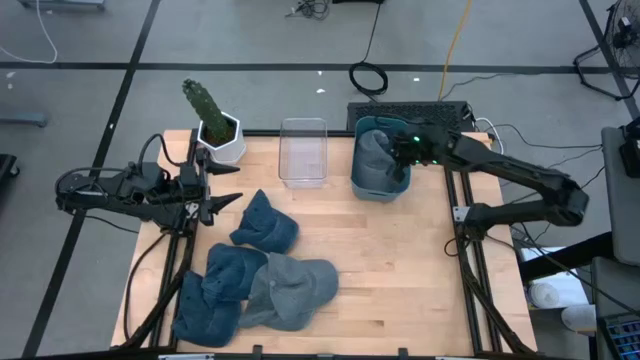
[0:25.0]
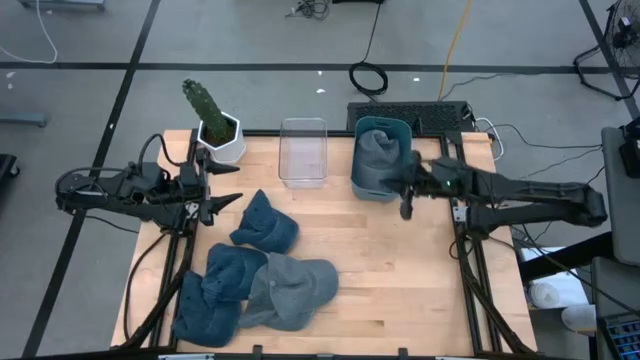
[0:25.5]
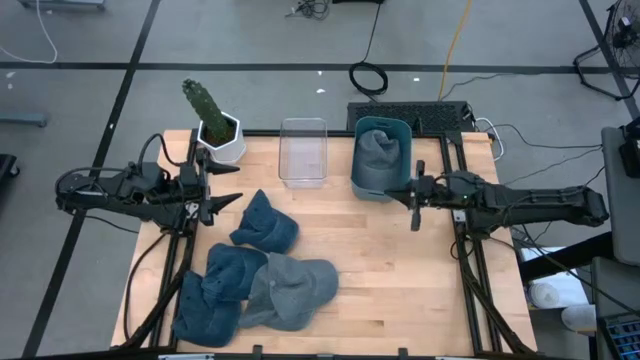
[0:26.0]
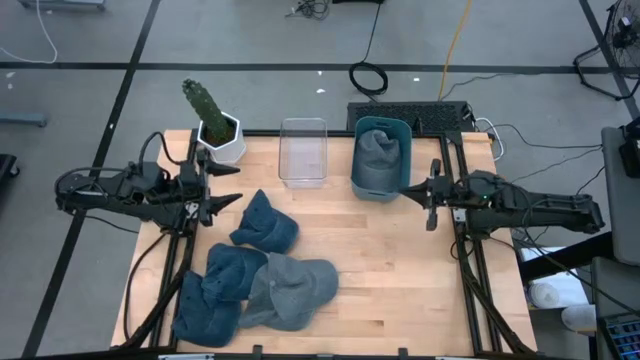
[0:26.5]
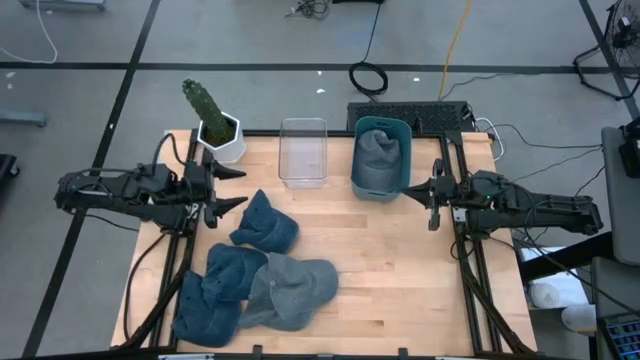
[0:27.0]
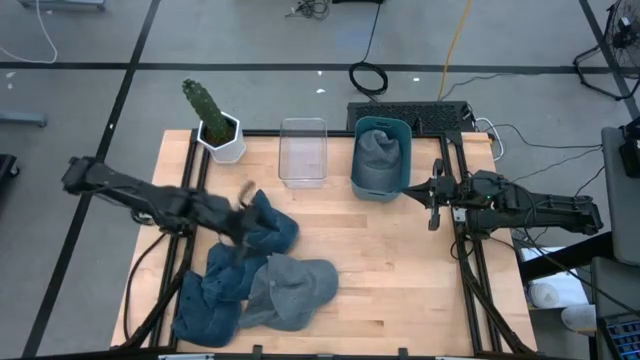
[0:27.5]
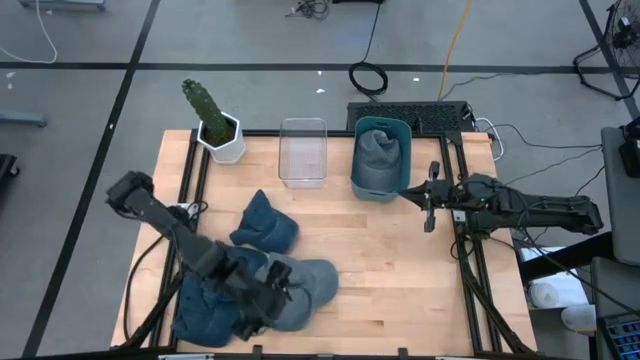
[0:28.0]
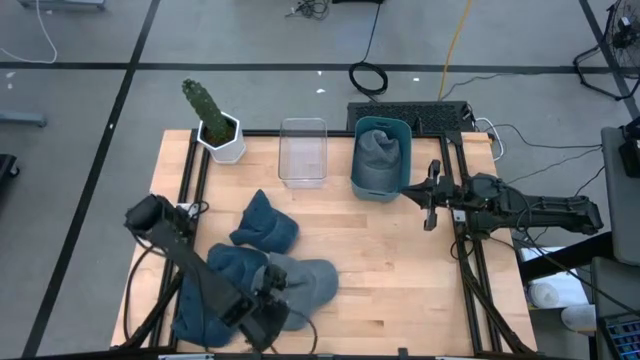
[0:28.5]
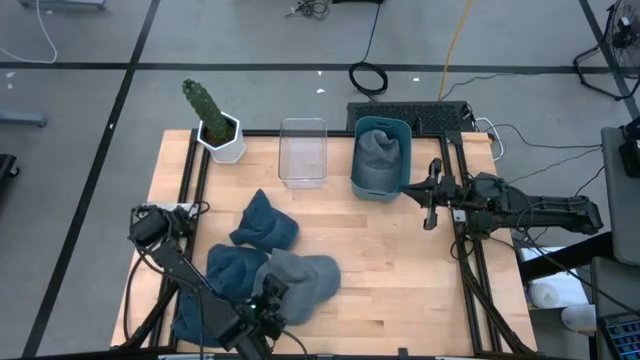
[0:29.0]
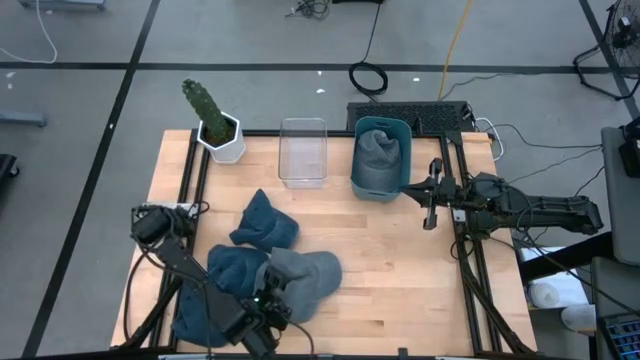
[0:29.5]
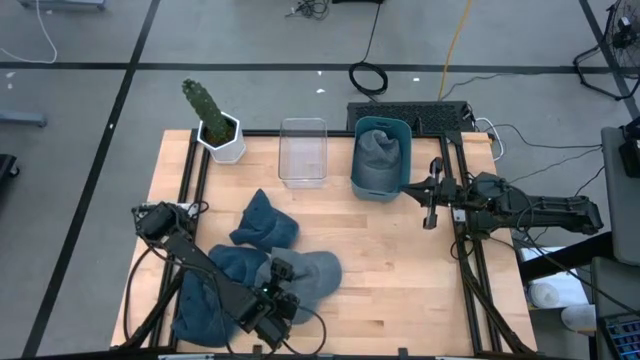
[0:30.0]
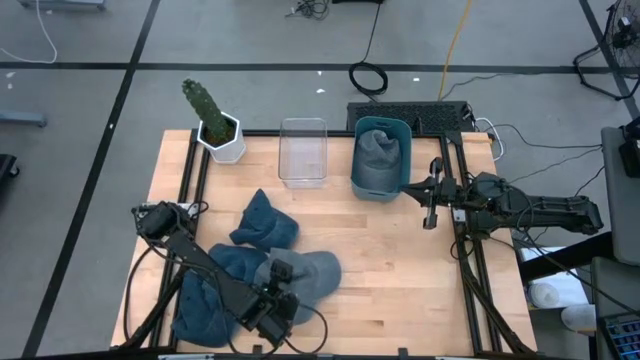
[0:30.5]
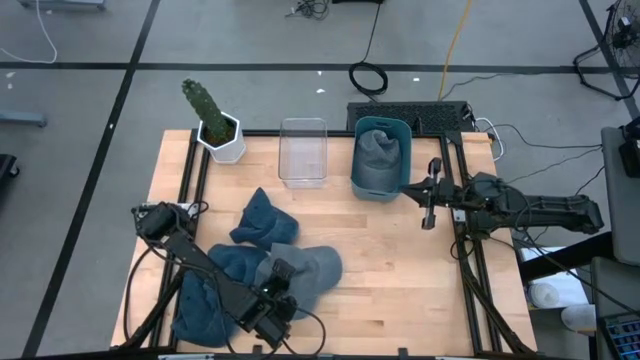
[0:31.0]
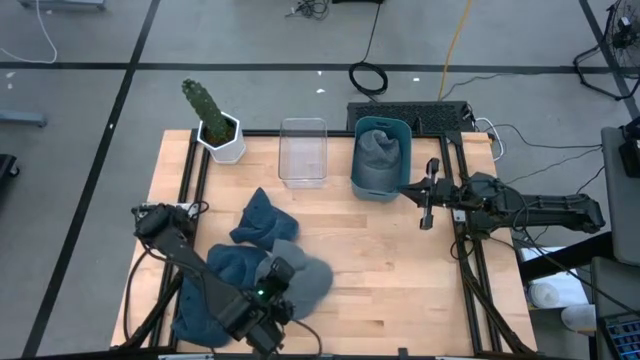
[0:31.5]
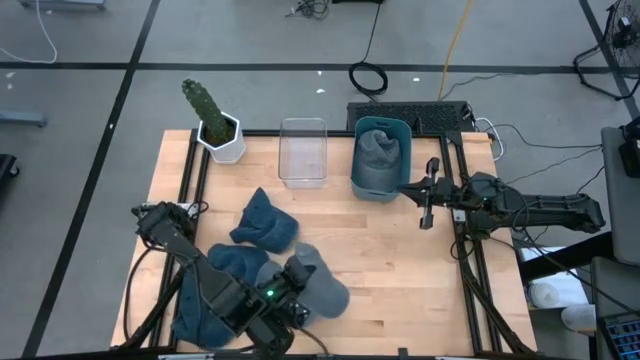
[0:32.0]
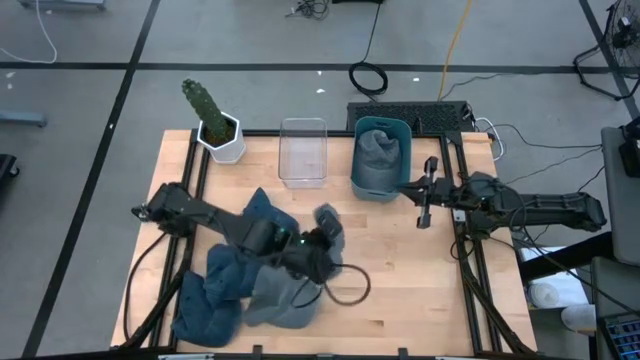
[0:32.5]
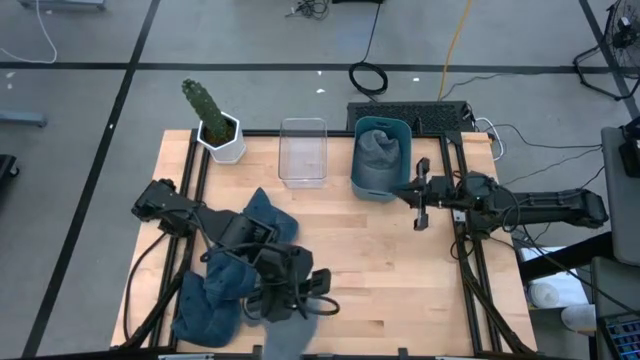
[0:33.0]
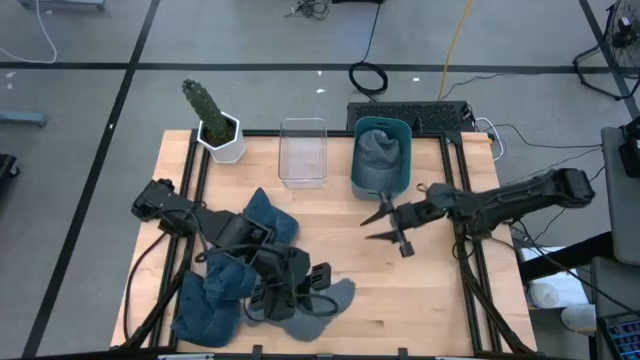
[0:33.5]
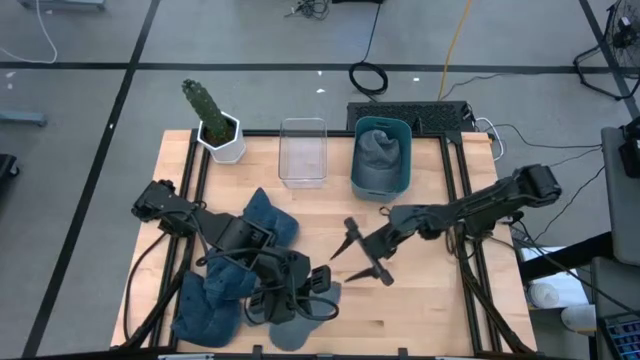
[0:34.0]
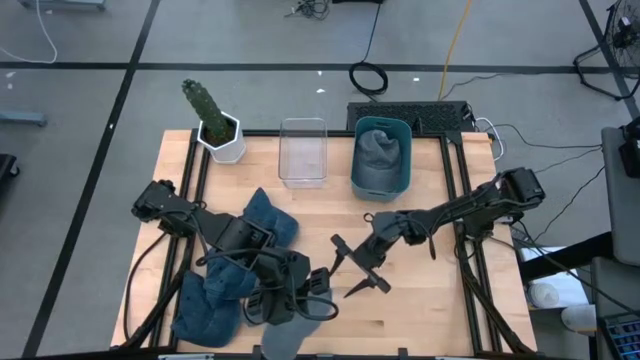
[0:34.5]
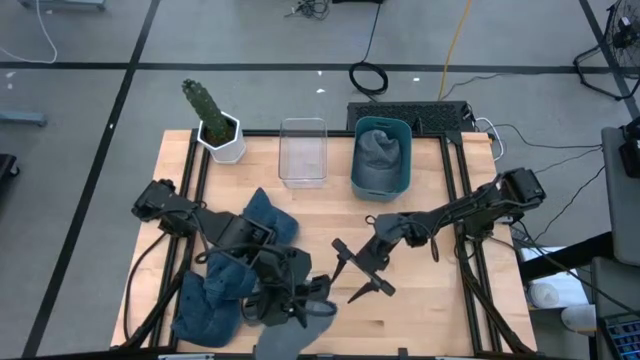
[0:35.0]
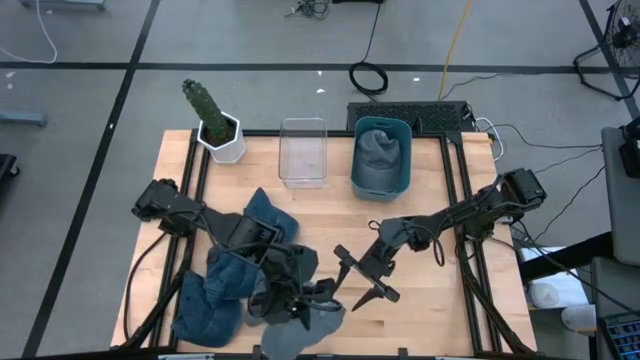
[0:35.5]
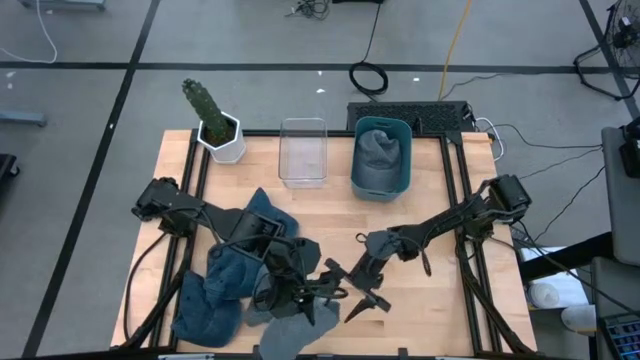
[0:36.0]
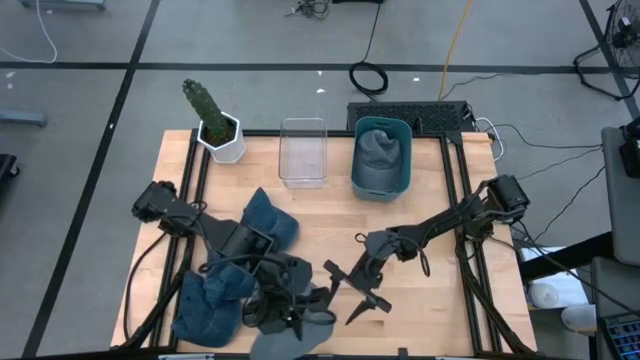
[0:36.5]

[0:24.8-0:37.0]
Task: Pick & Place hat
Put the top gray cap into the blue bin

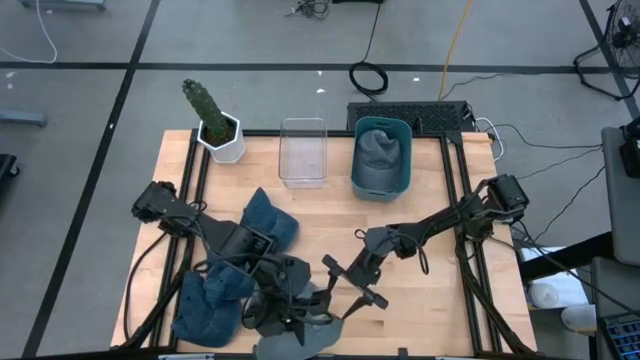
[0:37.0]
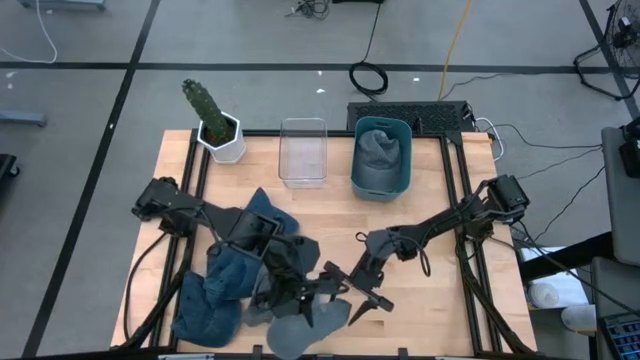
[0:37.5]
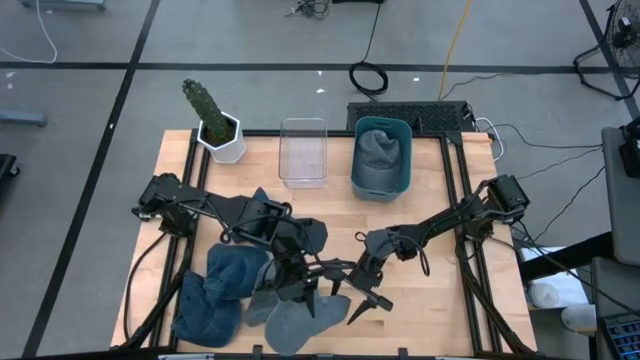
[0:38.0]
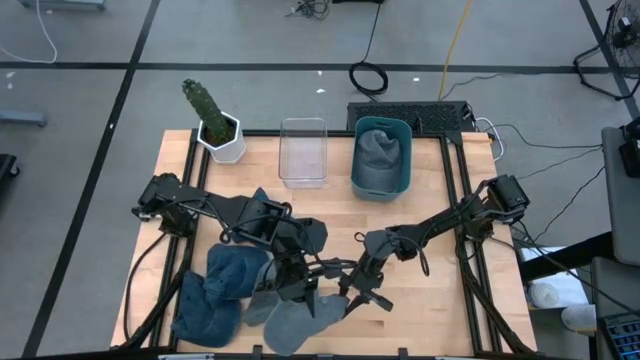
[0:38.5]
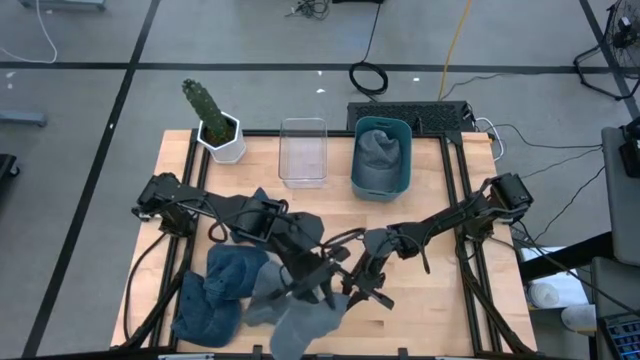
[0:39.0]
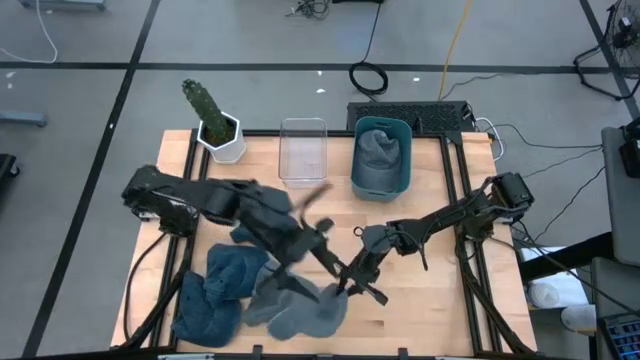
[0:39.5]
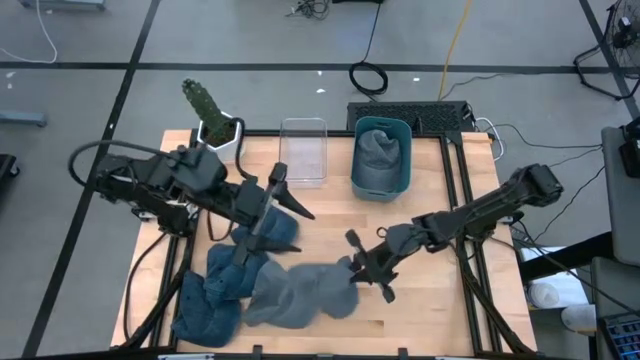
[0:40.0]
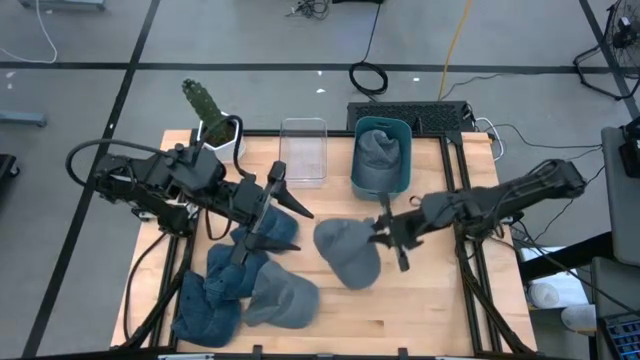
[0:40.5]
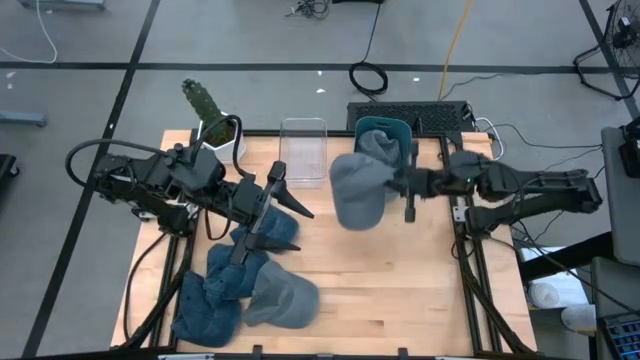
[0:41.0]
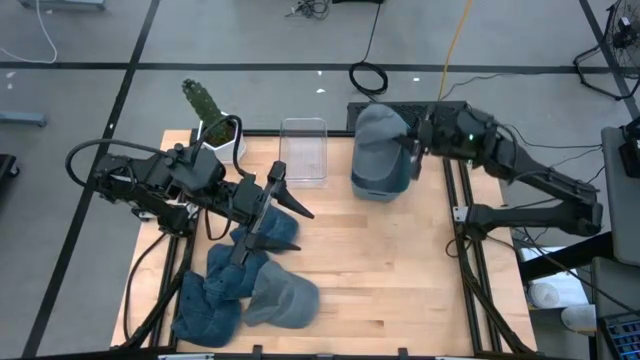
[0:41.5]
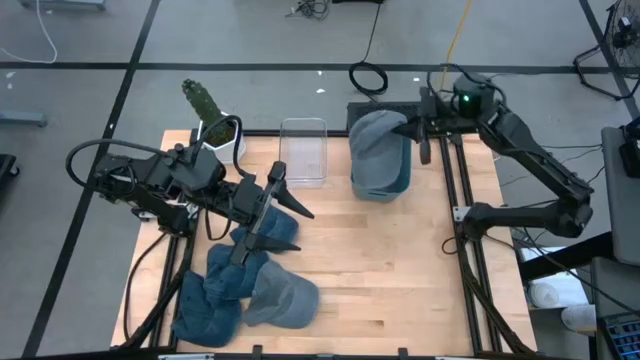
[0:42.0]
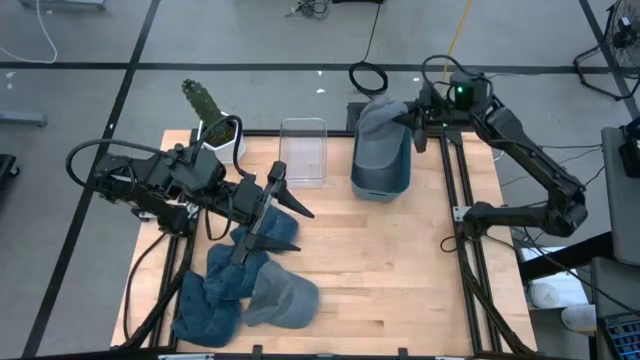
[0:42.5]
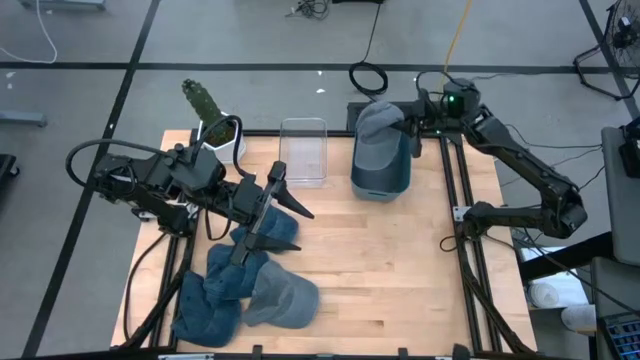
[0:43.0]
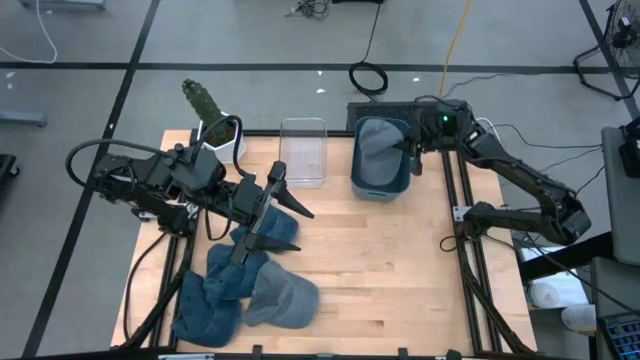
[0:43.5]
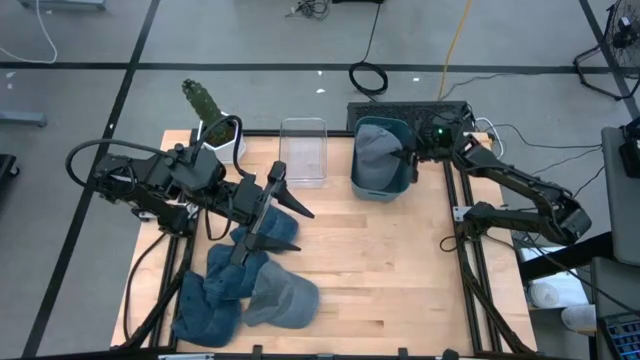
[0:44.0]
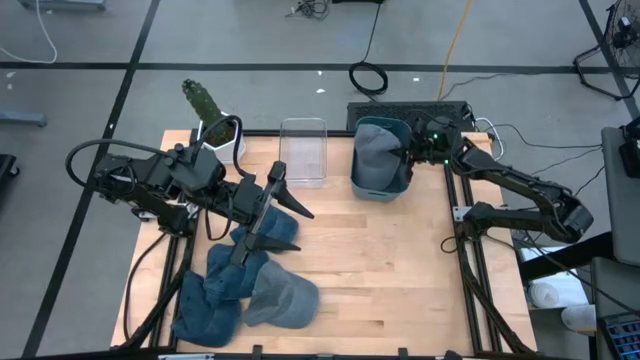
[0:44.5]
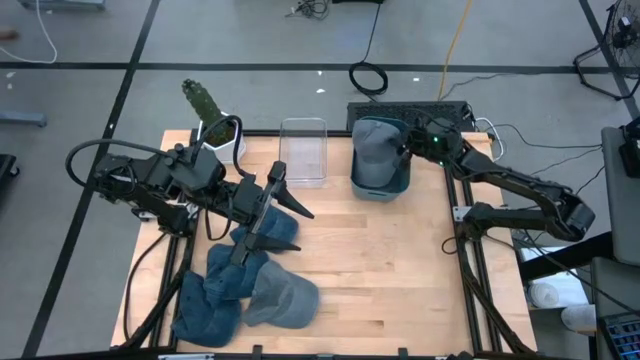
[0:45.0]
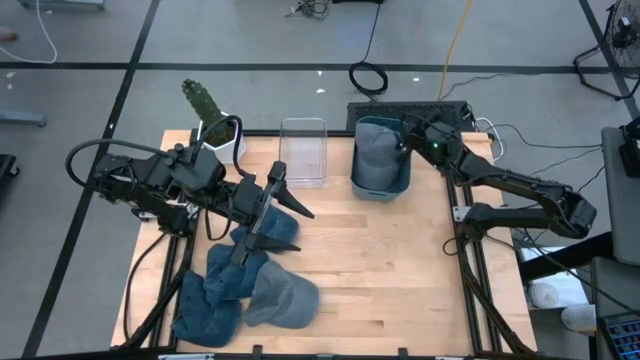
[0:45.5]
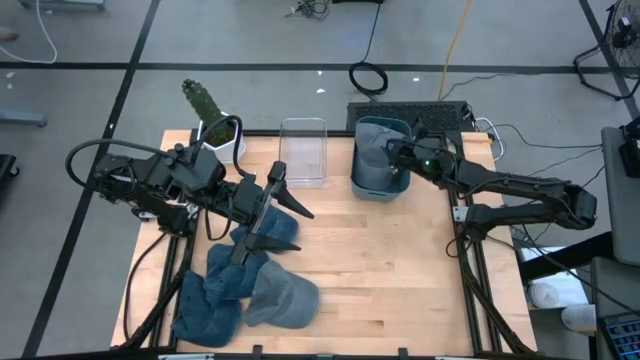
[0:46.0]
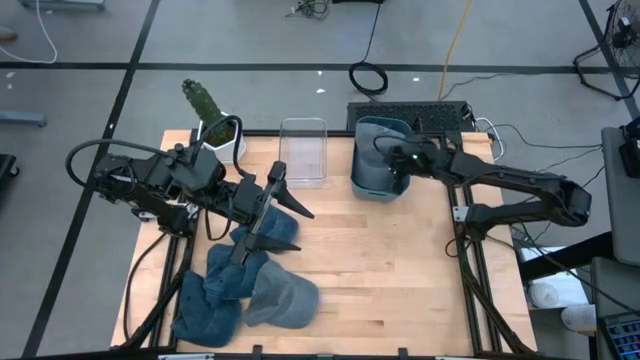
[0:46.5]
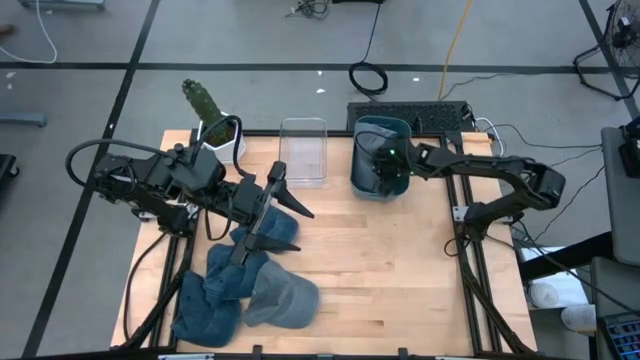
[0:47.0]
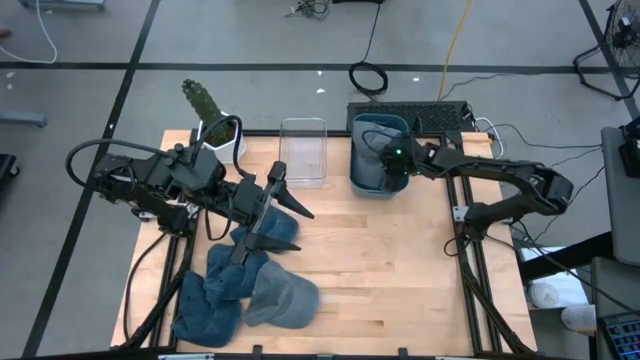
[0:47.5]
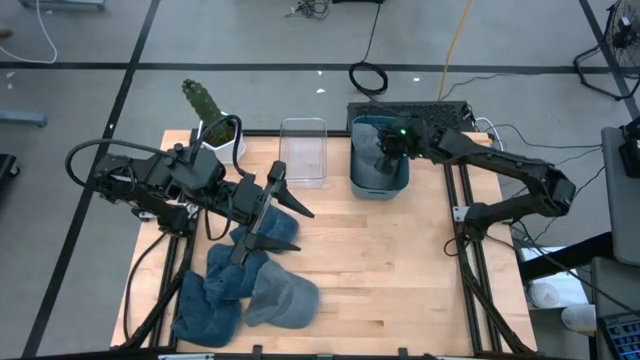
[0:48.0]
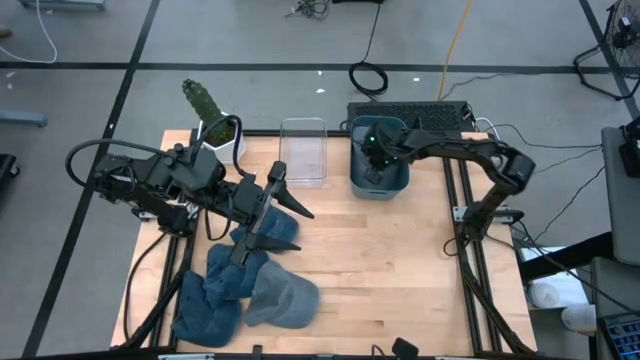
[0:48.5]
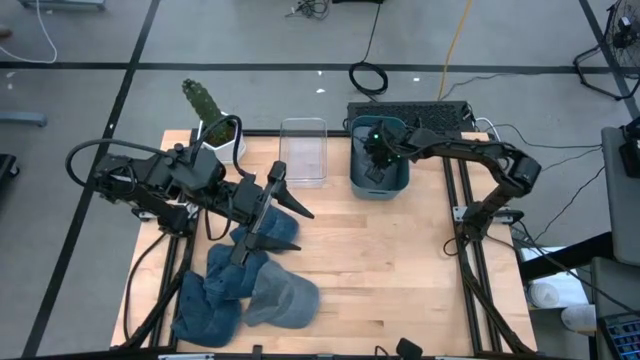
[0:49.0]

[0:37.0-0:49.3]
Put the top gray cap into the blue bin
